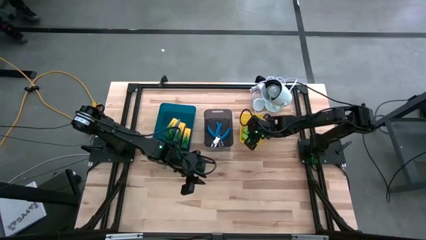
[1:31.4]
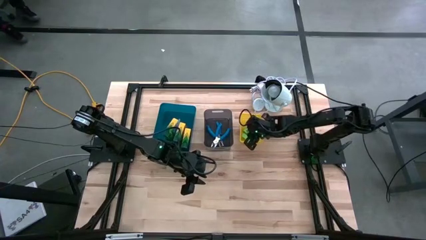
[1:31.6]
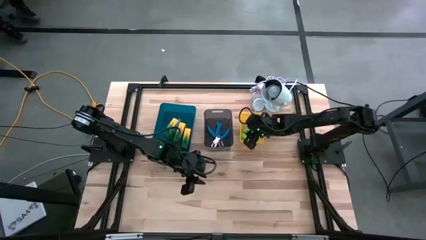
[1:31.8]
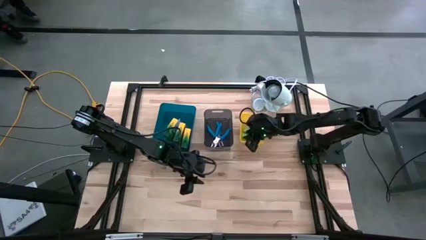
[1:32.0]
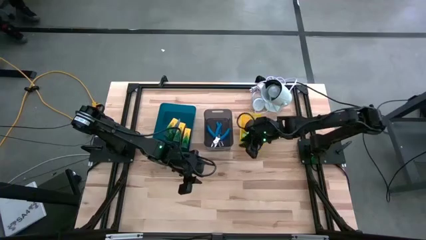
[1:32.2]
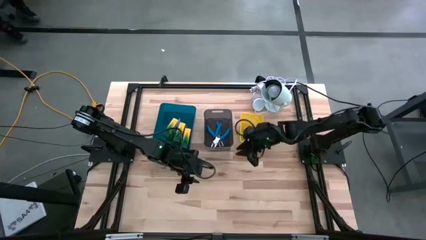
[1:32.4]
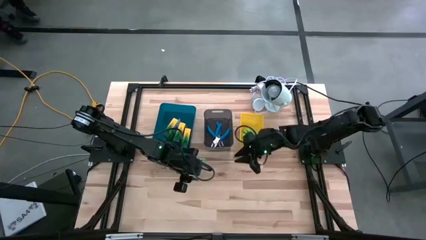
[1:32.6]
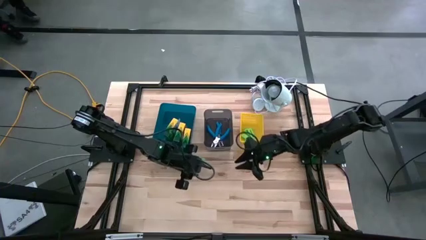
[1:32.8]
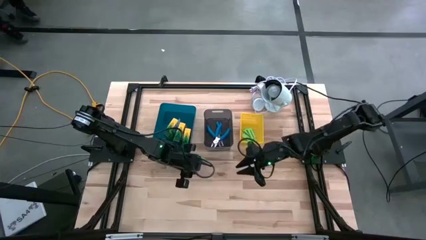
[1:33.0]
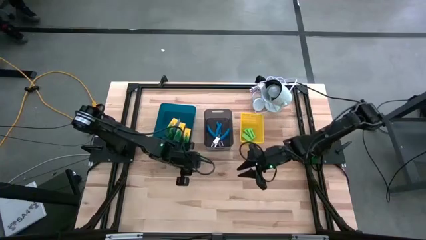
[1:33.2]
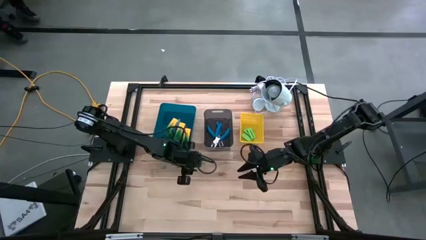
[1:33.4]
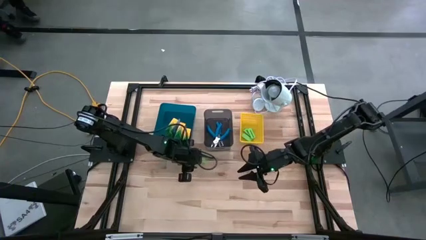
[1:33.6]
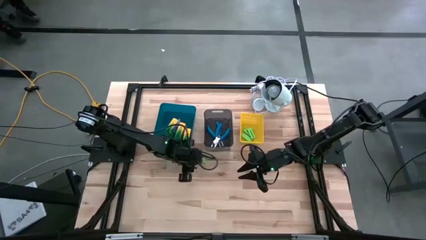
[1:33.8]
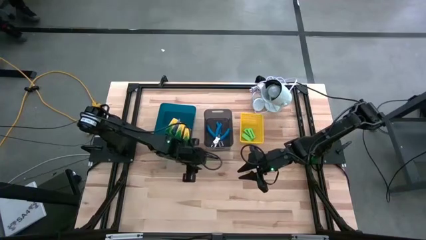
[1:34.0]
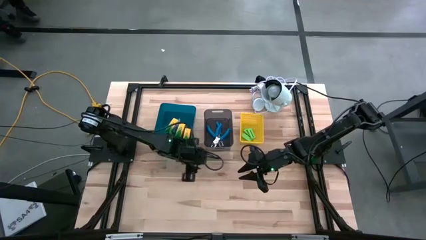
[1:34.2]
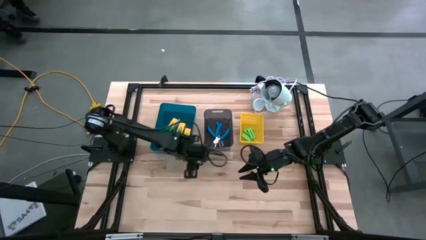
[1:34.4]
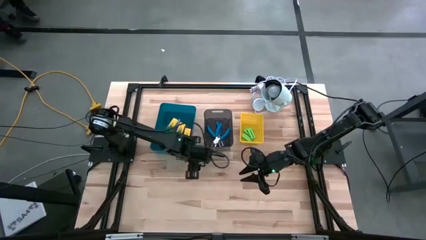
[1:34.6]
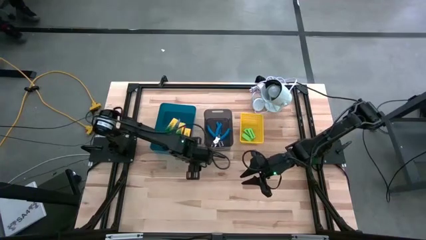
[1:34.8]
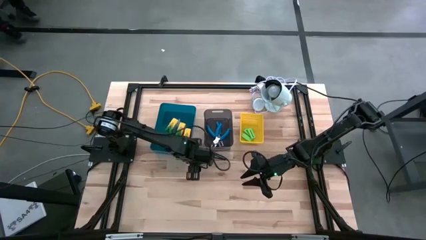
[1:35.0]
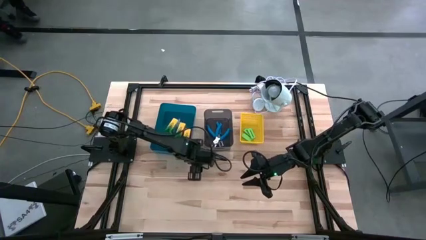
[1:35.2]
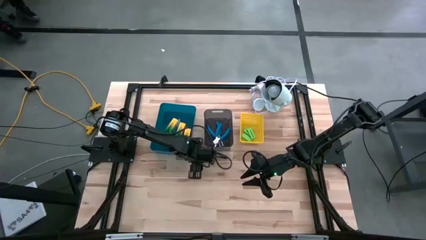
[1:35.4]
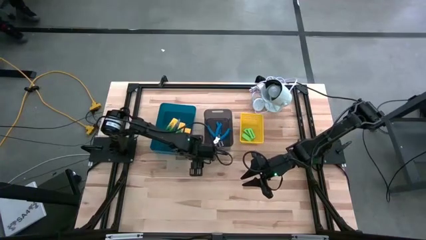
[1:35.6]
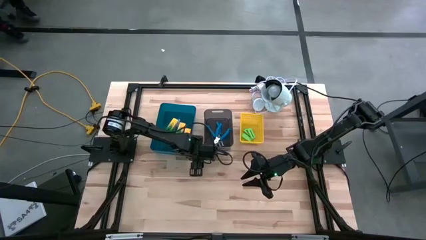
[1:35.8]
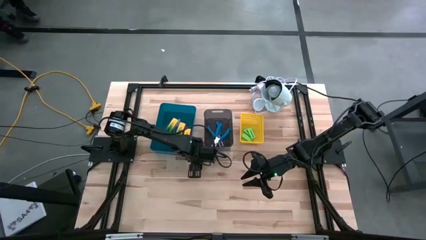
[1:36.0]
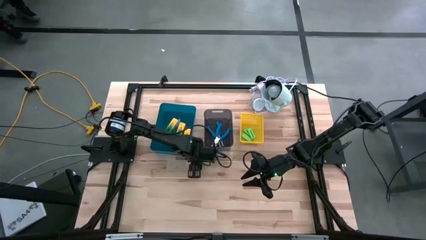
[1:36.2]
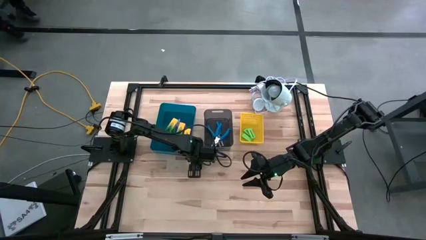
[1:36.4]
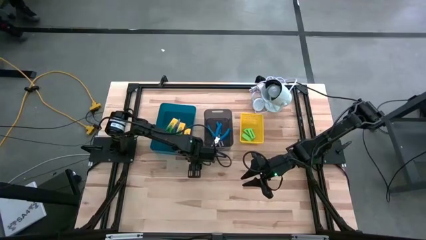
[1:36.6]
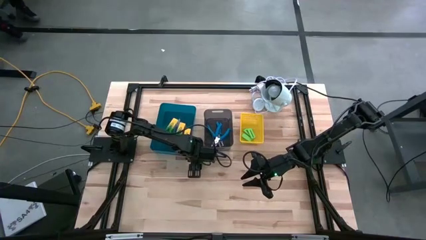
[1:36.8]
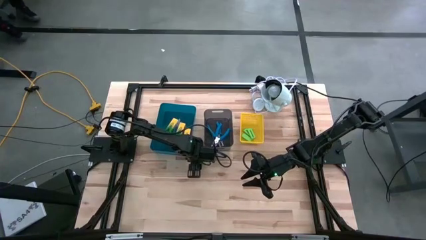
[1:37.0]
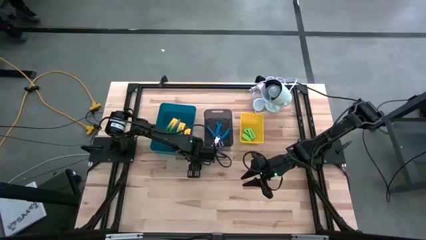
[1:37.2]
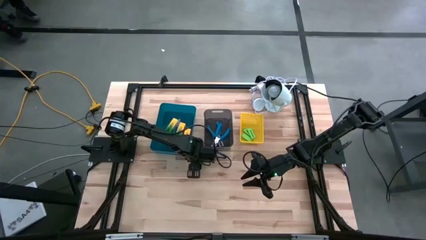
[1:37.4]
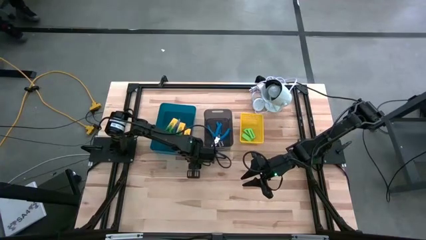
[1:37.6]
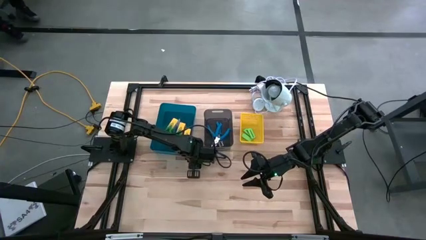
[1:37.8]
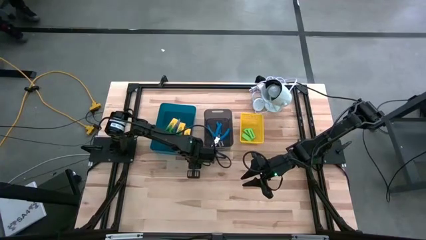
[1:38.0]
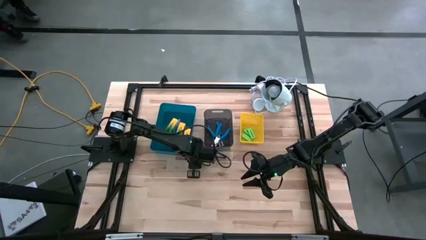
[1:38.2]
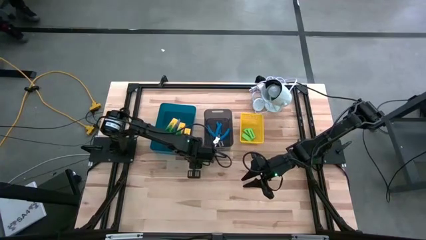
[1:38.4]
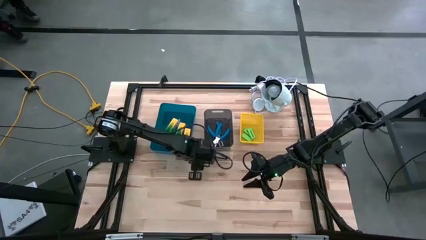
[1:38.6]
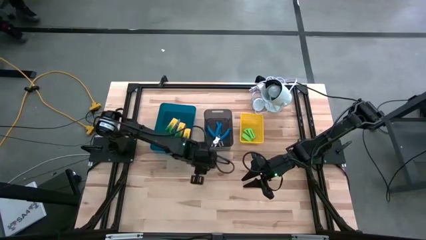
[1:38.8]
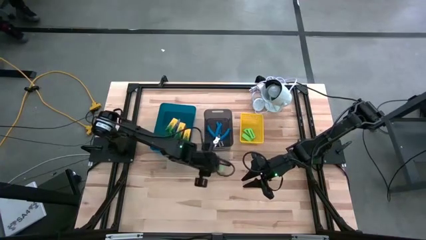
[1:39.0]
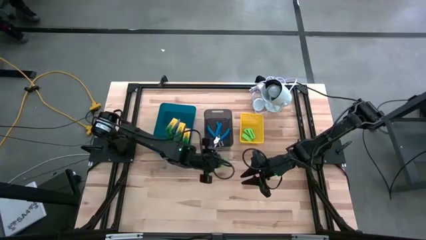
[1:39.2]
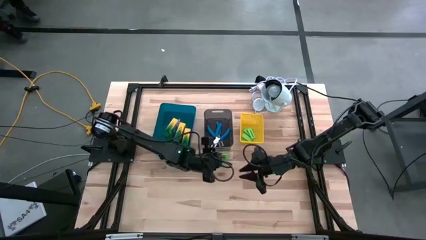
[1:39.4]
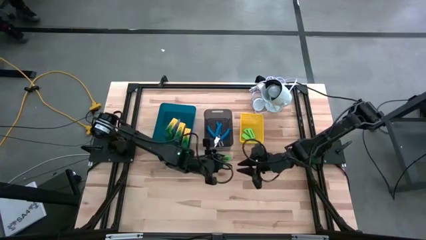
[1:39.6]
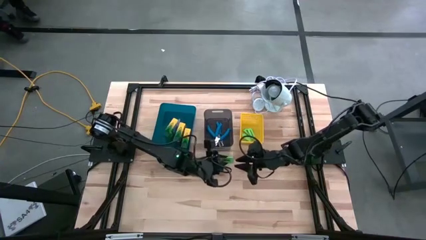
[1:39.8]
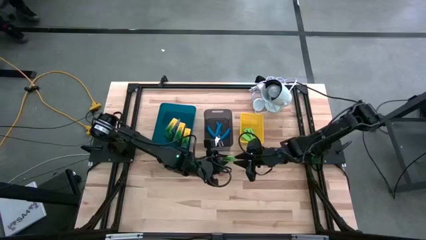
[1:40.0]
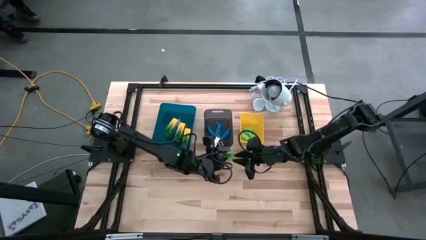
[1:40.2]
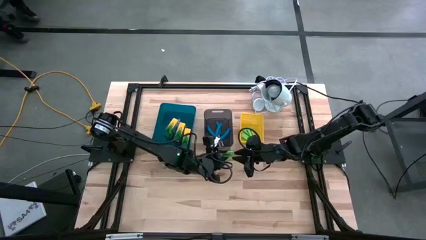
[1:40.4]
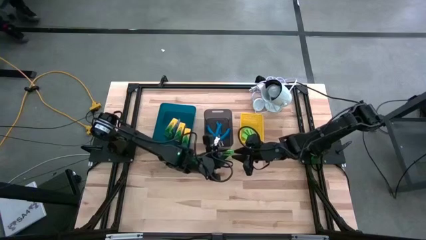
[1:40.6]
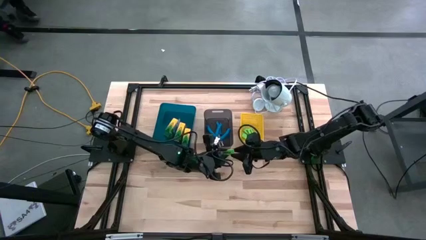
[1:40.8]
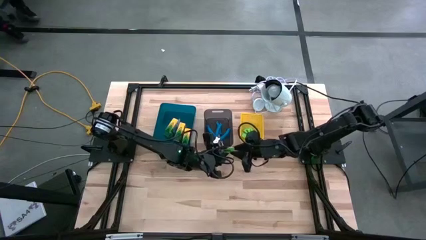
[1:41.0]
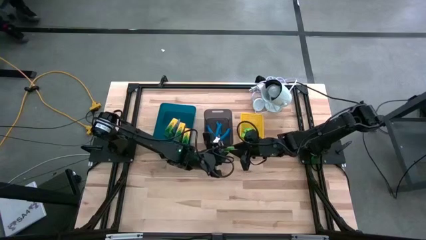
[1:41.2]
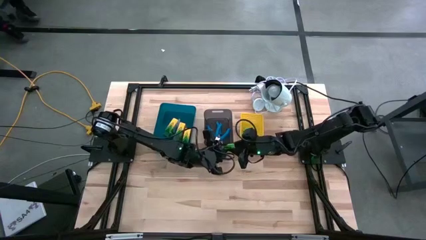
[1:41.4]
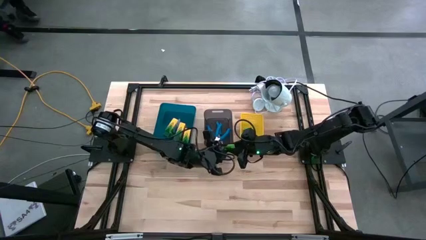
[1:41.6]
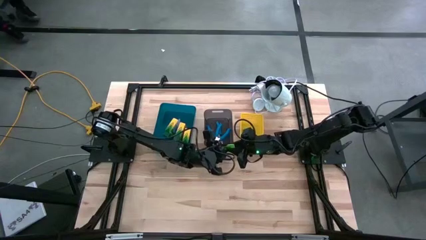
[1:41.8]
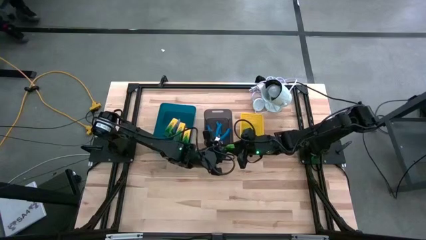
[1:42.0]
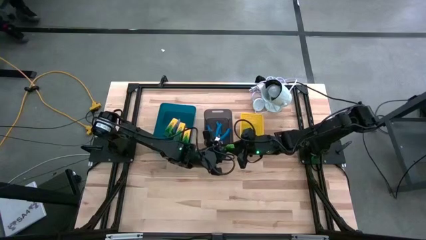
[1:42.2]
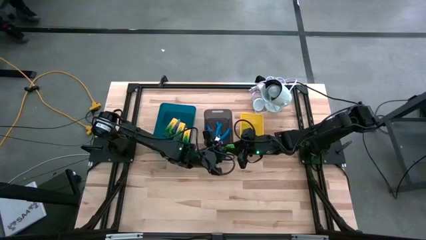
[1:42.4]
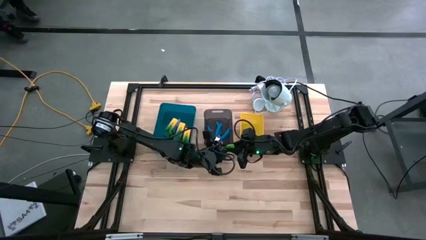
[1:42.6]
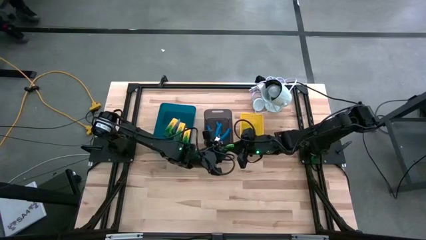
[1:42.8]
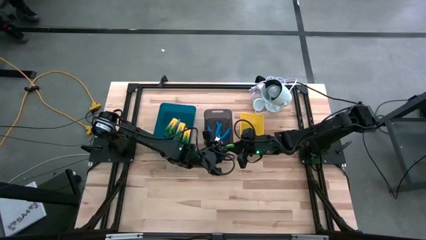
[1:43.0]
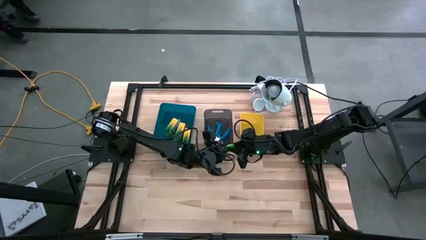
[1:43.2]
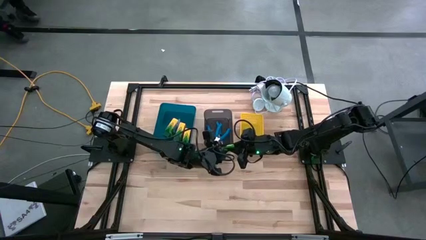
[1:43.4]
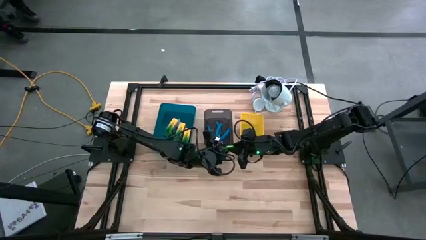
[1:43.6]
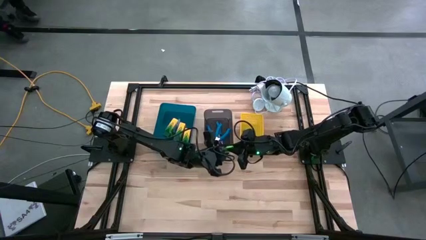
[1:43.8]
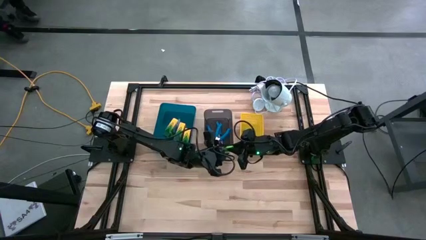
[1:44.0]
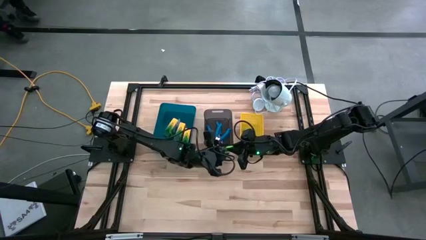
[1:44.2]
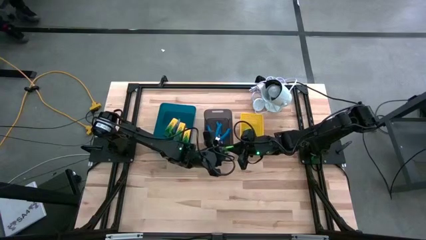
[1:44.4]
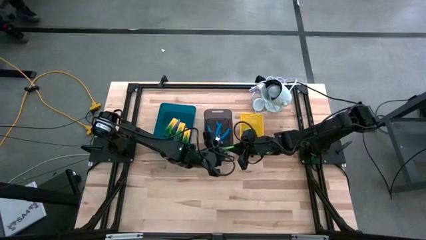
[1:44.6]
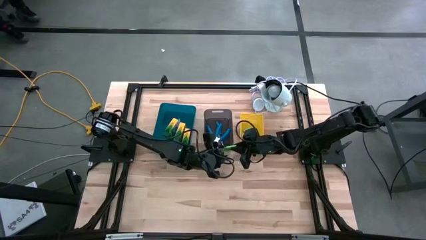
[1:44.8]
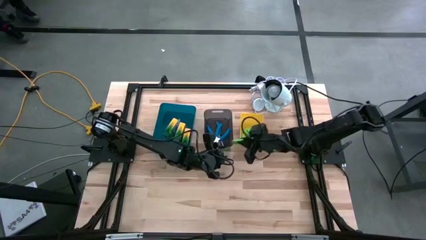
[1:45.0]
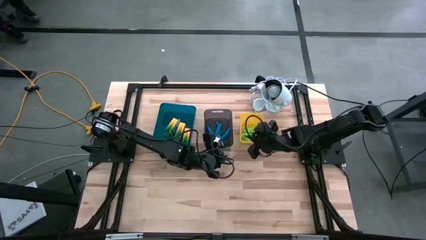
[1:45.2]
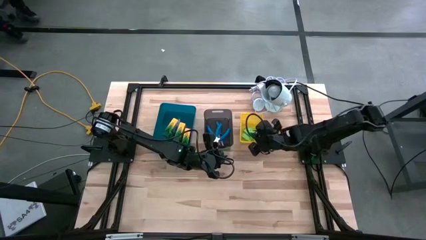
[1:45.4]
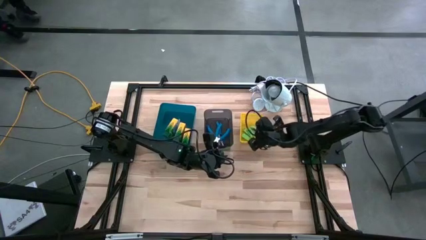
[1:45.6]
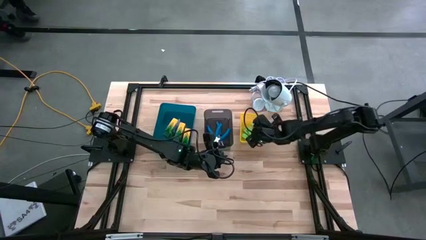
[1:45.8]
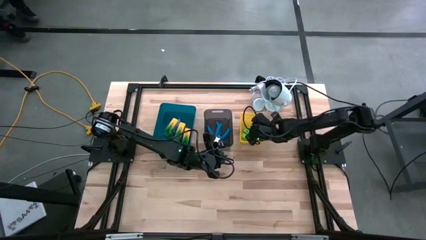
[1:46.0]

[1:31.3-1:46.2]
Task: Pick & Place School Supplies
Put the green eraser into the yellow bin
